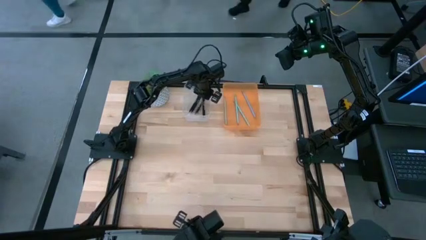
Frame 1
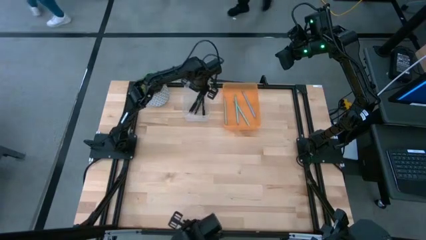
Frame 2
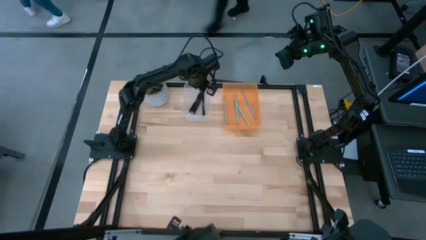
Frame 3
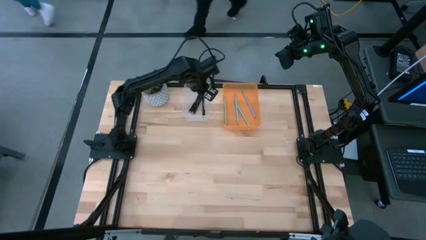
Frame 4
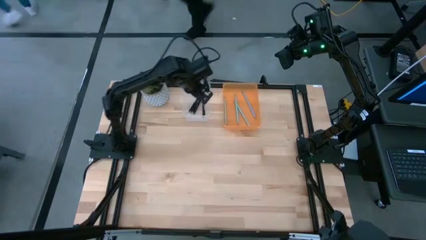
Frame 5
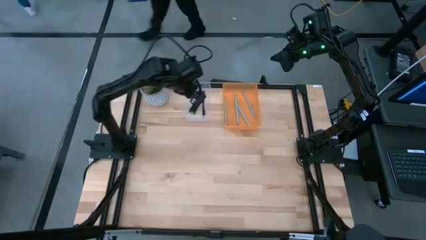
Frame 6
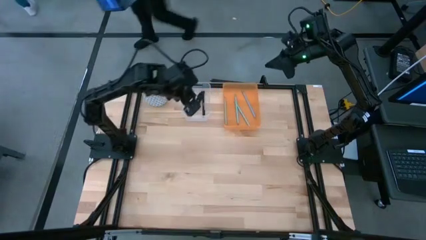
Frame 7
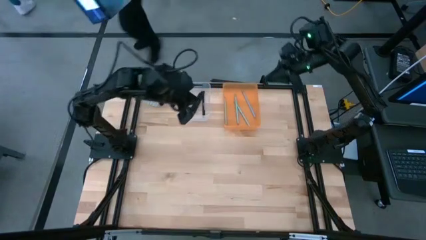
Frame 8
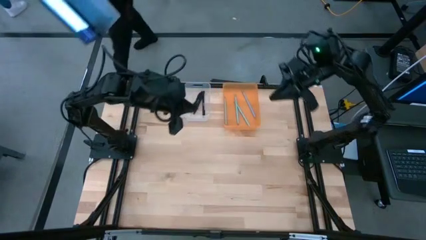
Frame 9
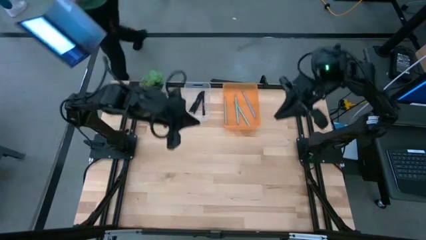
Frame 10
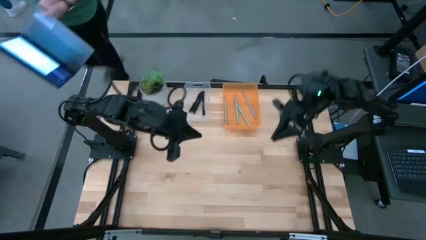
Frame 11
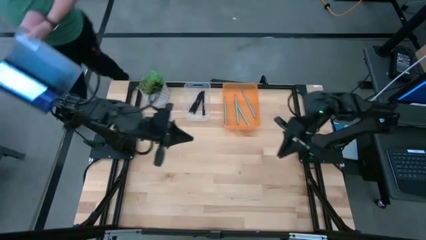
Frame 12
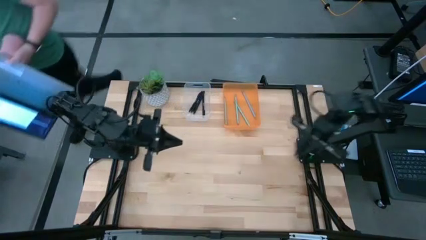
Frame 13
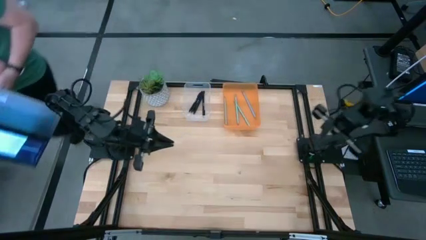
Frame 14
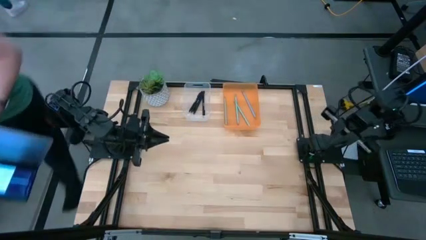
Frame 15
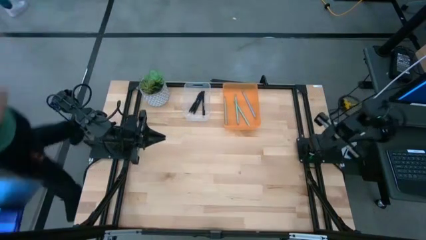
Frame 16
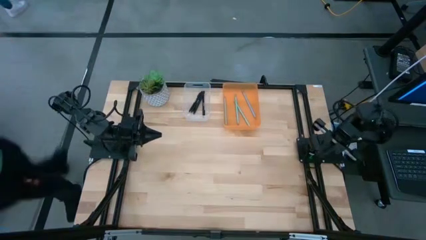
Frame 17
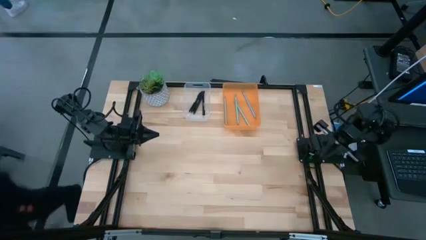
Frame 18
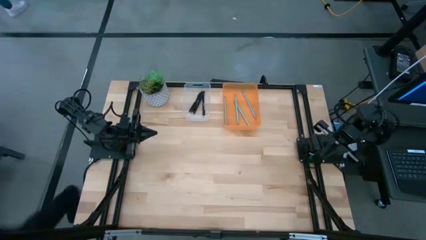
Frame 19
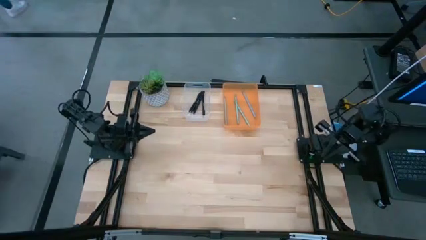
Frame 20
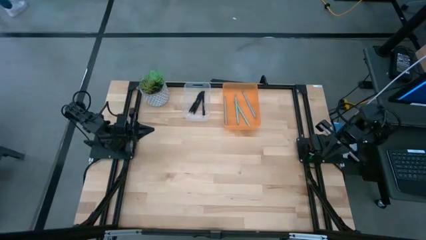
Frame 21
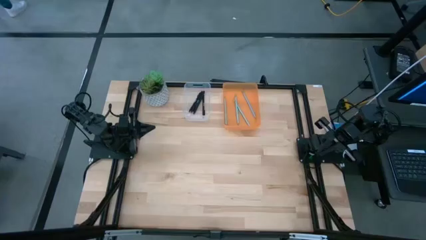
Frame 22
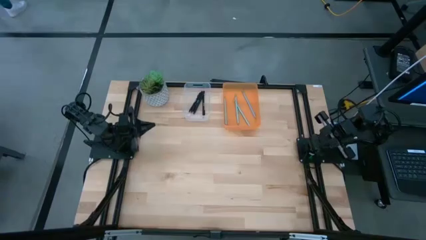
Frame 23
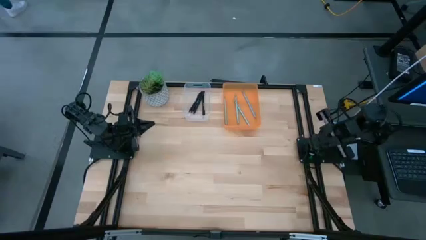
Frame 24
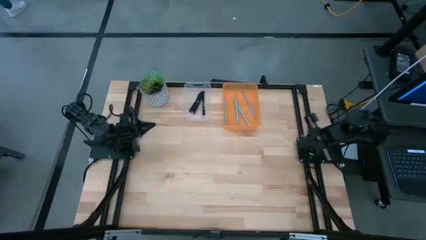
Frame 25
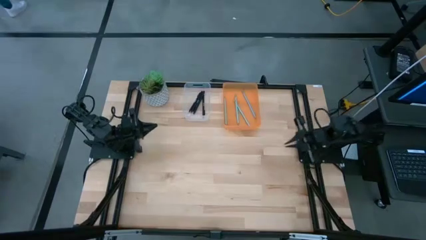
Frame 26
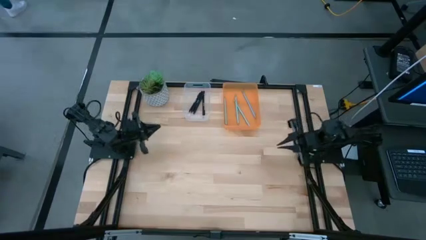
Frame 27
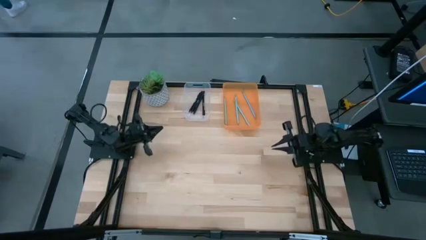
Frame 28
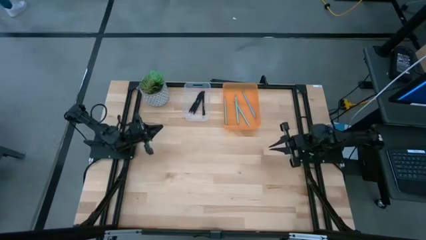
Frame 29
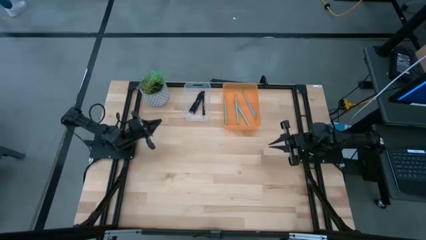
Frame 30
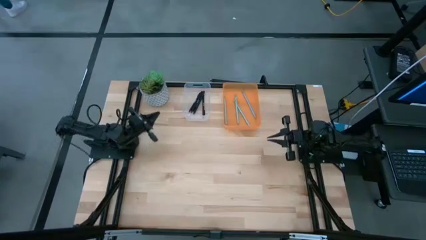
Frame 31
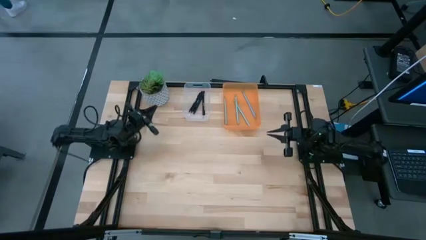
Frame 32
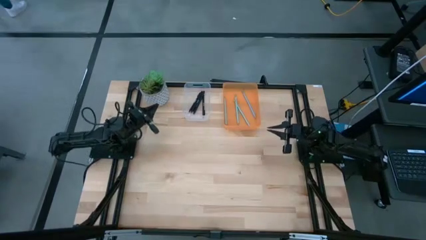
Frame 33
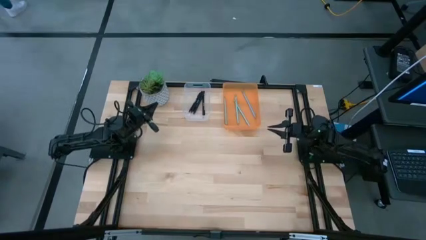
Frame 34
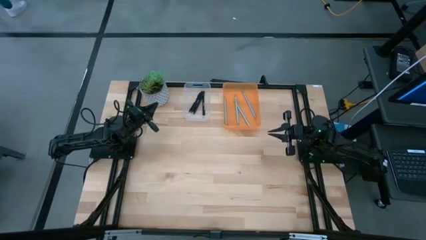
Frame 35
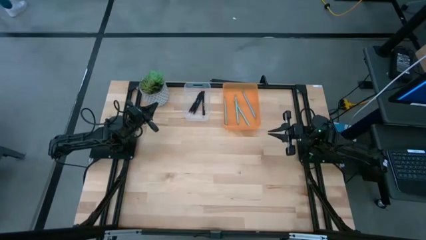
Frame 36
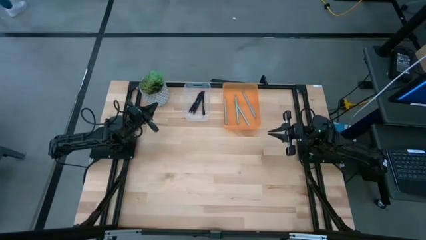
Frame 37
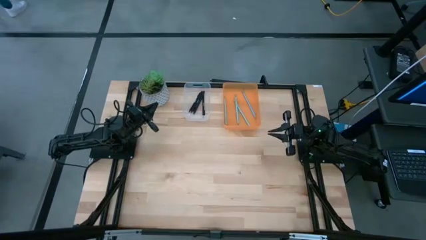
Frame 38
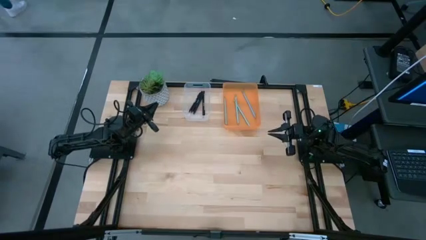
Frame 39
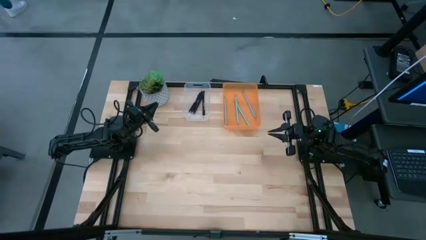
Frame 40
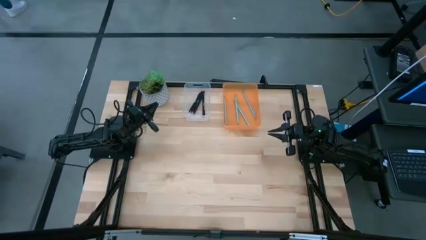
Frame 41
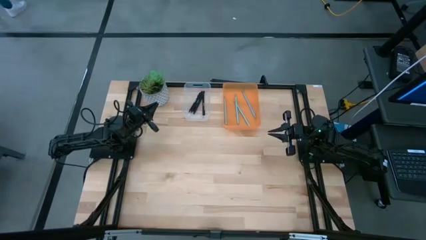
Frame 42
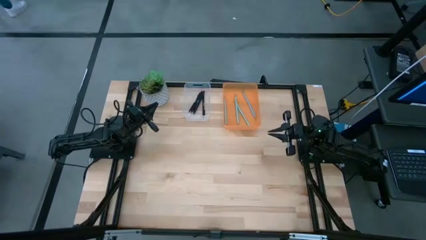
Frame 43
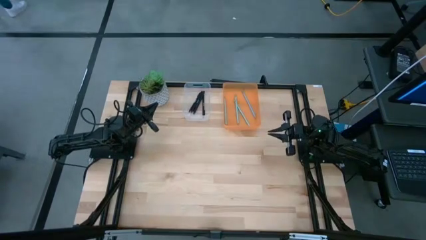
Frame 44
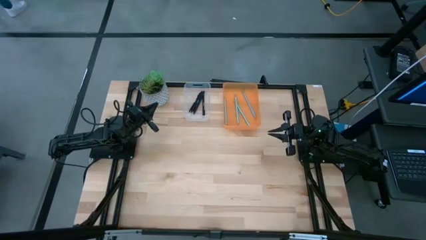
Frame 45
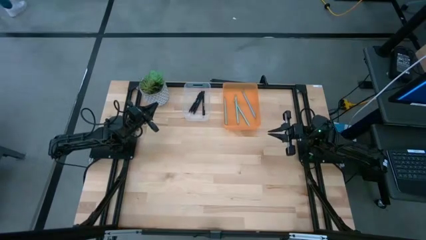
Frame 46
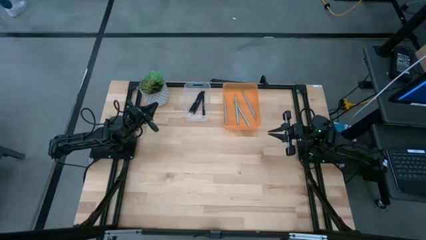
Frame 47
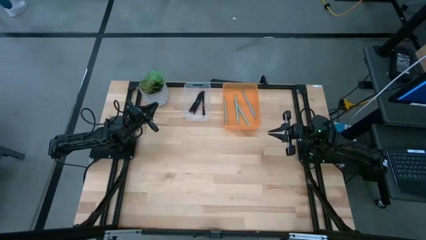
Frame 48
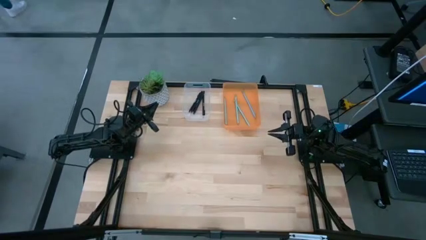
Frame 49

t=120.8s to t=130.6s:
Task: Sort pens & pencils
Return to Home Position

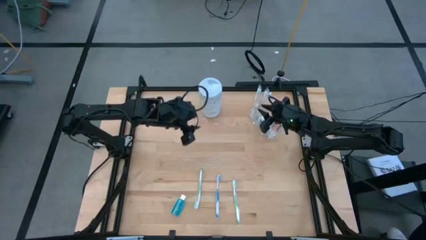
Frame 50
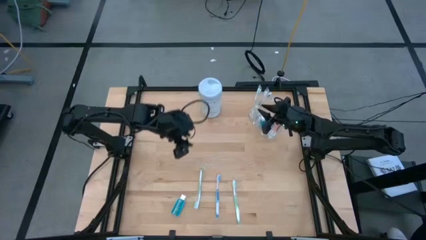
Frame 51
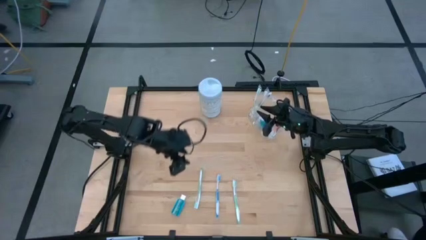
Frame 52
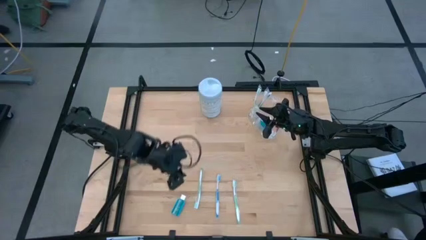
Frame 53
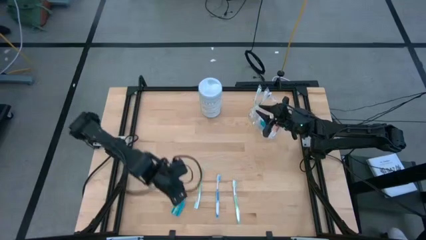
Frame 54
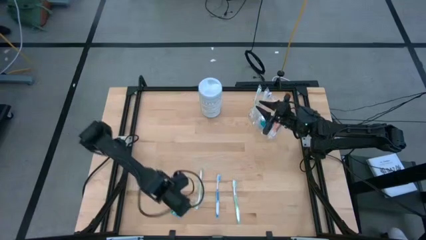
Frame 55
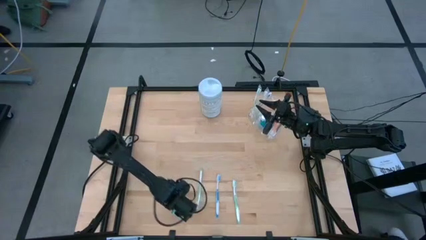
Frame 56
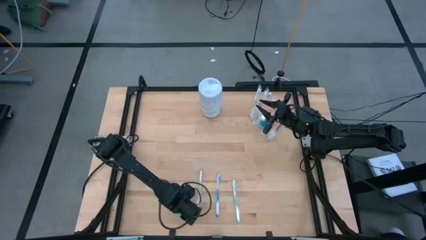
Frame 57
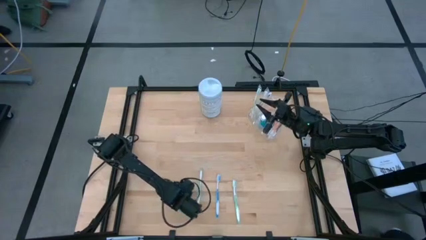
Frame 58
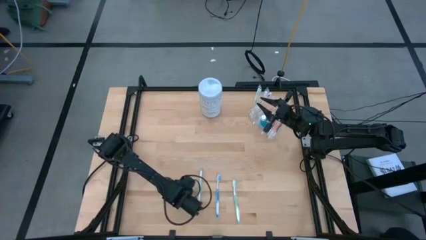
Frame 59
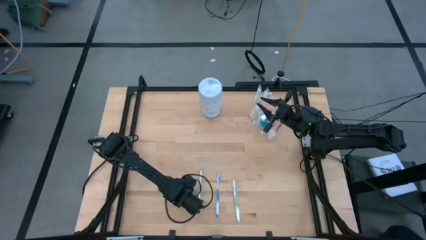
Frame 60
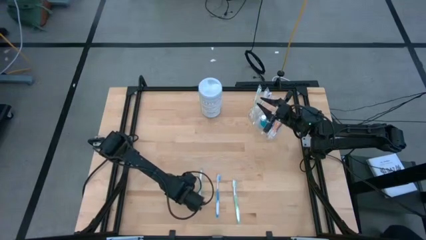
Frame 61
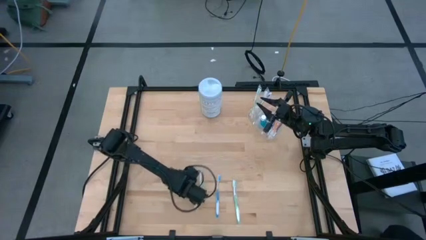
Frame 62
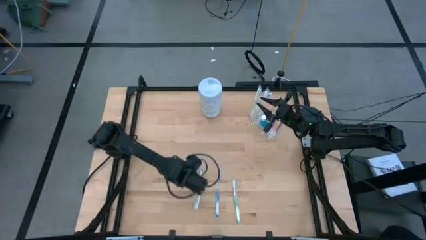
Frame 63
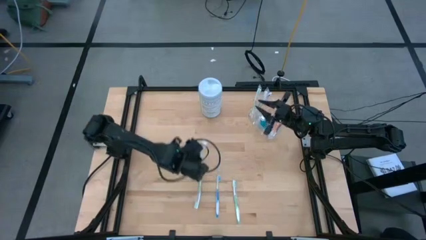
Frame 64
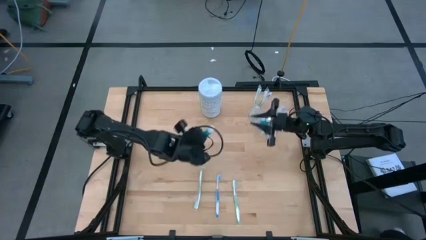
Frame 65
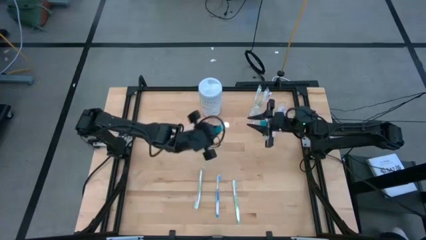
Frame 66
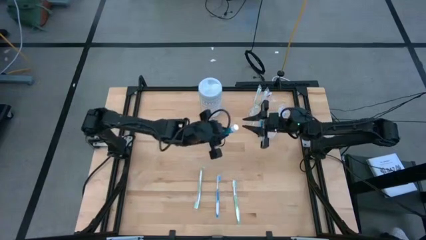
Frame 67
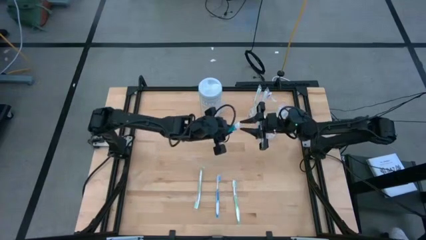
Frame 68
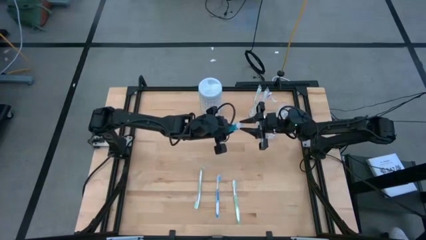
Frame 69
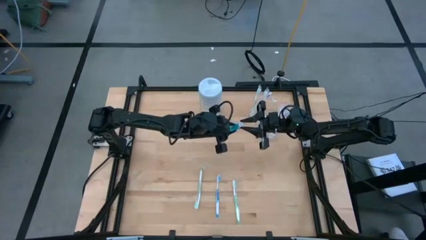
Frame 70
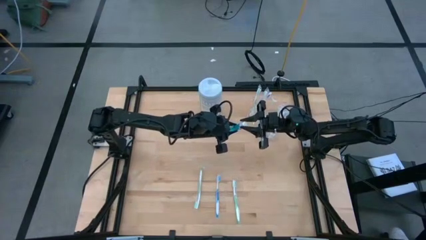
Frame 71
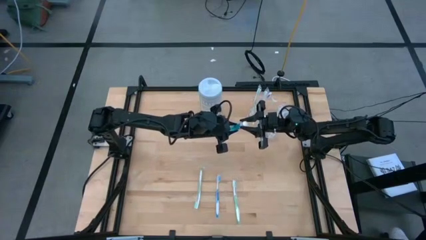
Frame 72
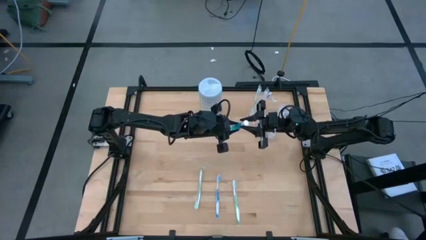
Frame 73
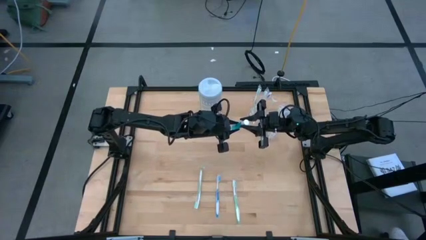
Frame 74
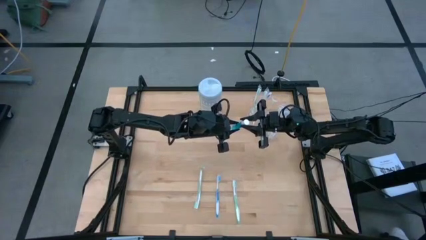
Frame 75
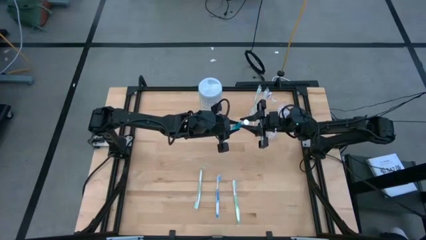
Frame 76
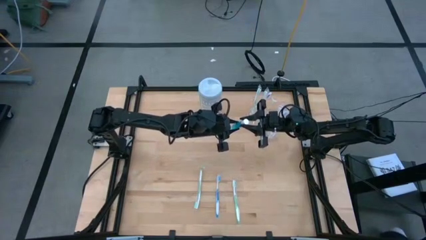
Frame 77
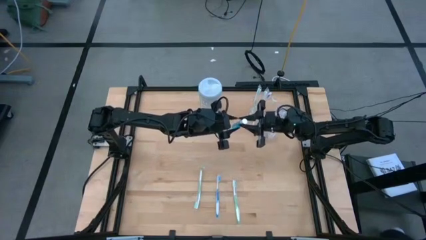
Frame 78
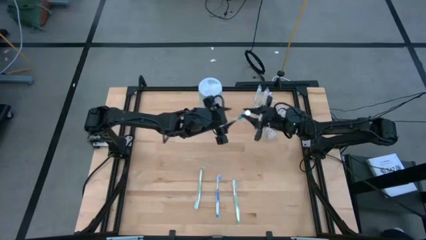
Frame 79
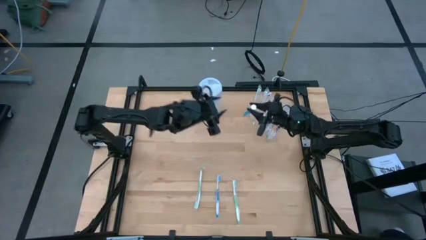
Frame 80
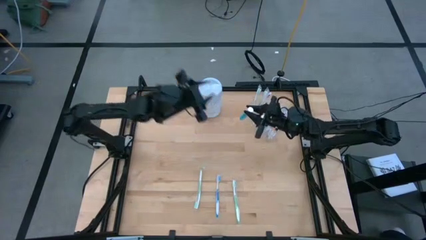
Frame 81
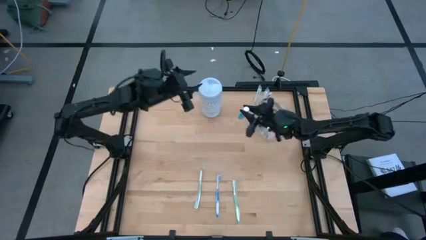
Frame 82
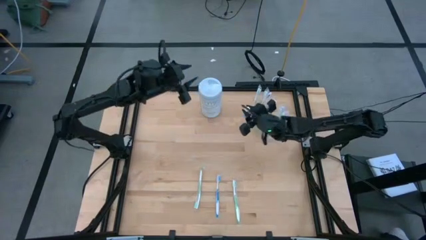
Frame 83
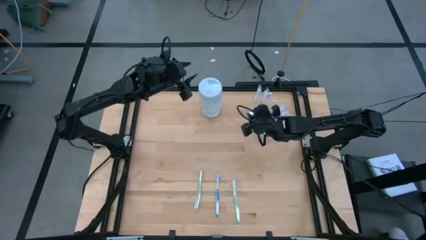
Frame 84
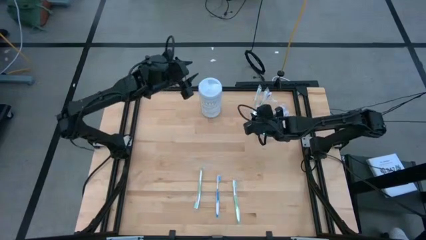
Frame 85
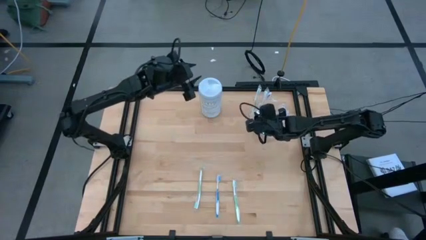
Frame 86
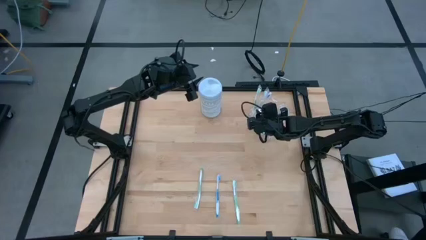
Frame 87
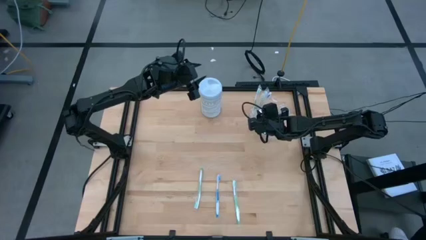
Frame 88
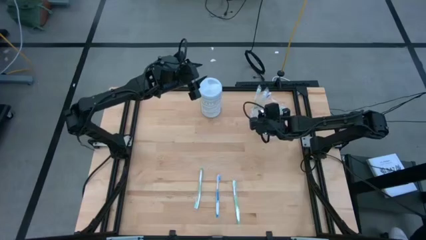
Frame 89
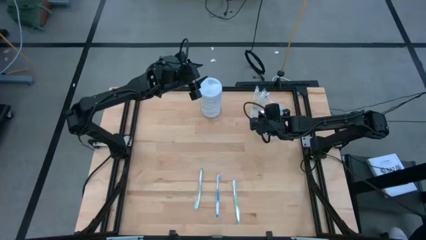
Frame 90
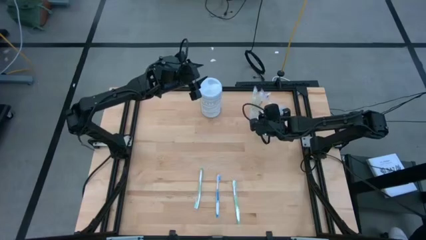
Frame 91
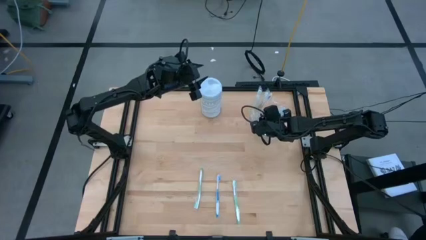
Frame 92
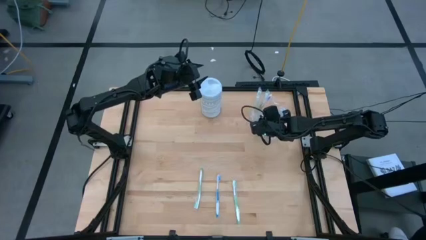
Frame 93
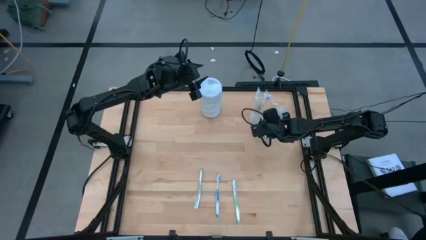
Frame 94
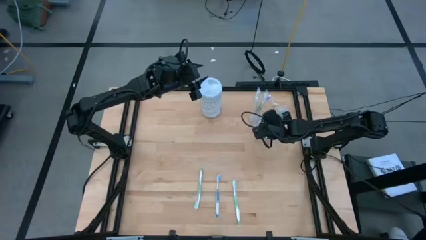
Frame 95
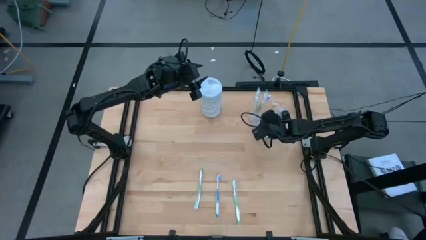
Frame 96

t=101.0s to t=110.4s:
Task: Pick & Place toothbrushing station
Put the blue mouthwash into the transparent organizer
